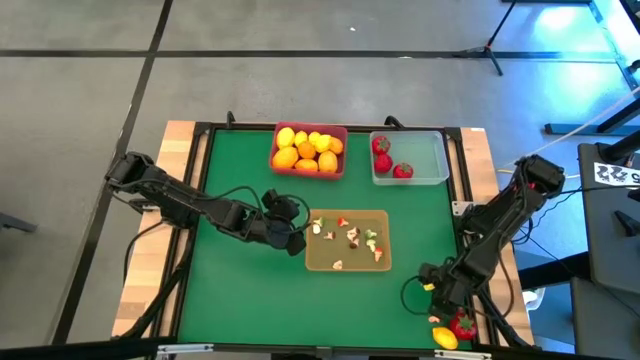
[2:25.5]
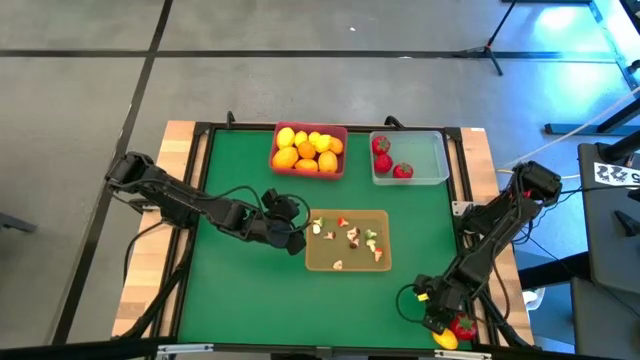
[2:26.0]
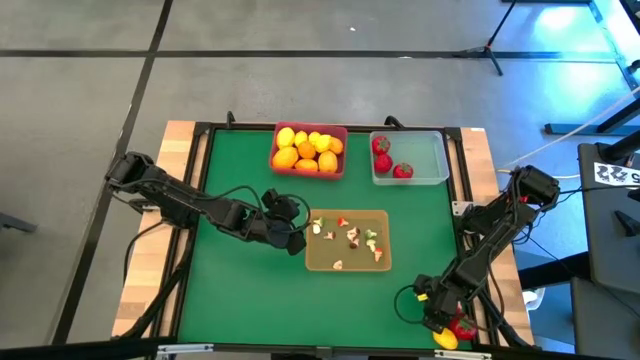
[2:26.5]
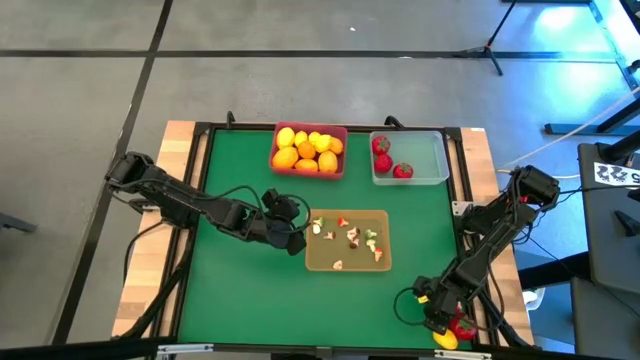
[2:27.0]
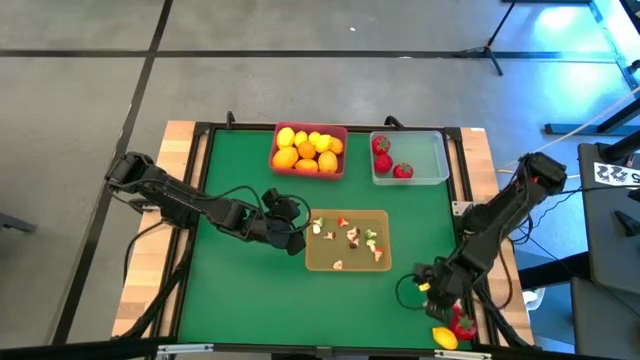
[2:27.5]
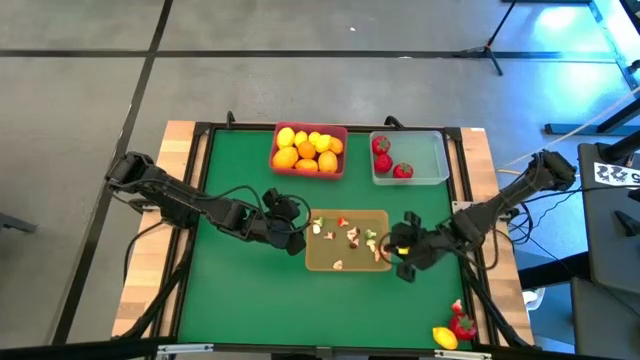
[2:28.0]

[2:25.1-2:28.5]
Task: Sort produce into baskets
Put the red mushroom into the orange bin

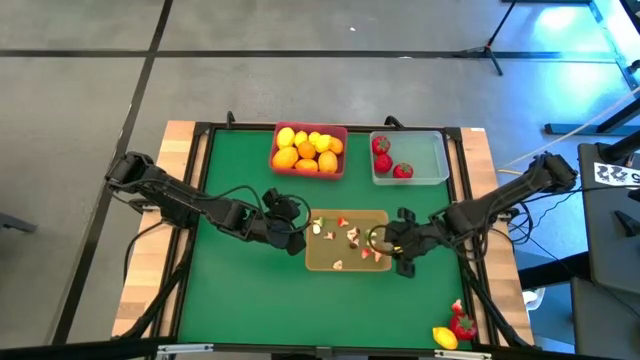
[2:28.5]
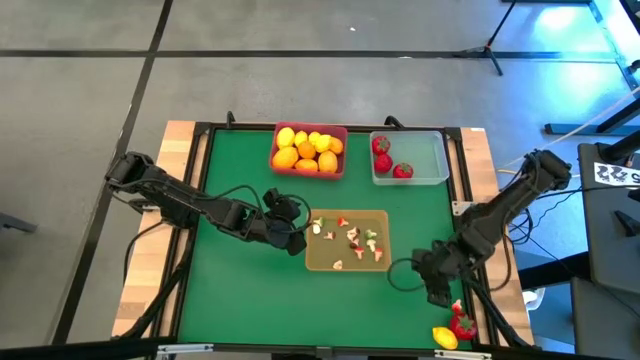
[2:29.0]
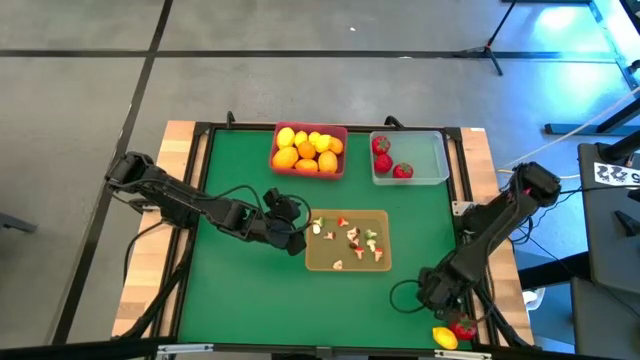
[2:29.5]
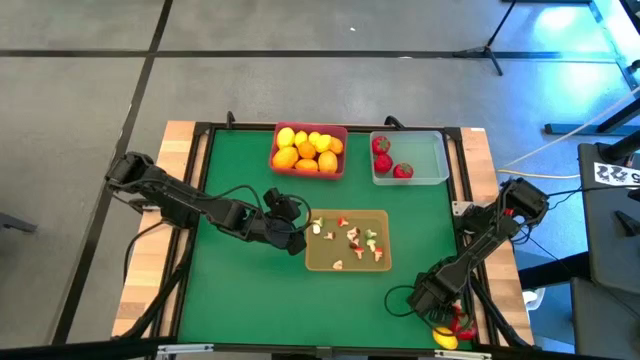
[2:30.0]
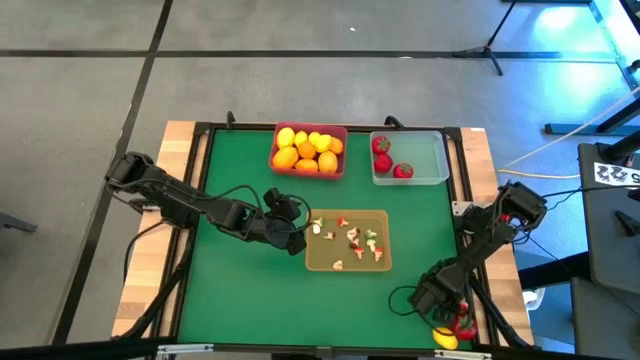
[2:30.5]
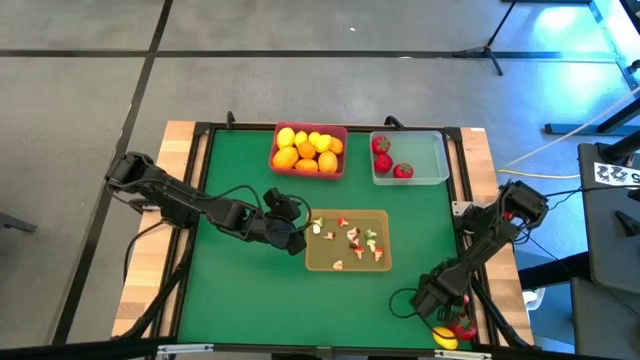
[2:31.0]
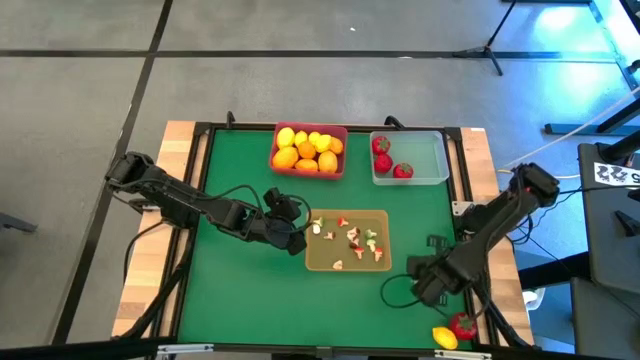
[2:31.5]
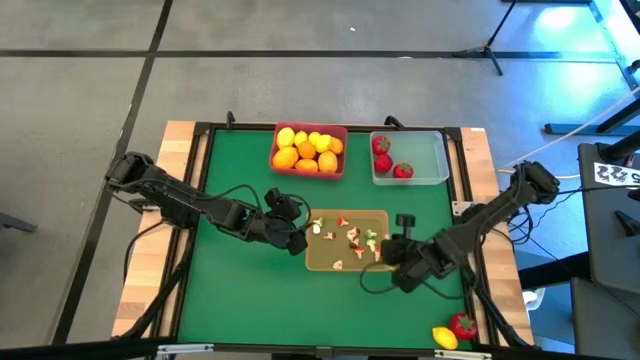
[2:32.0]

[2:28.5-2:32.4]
Put the red mushroom into the orange bin

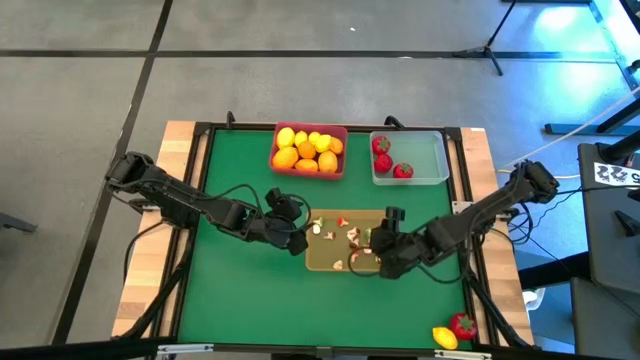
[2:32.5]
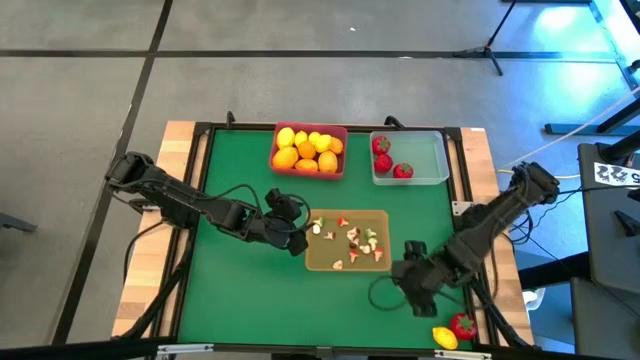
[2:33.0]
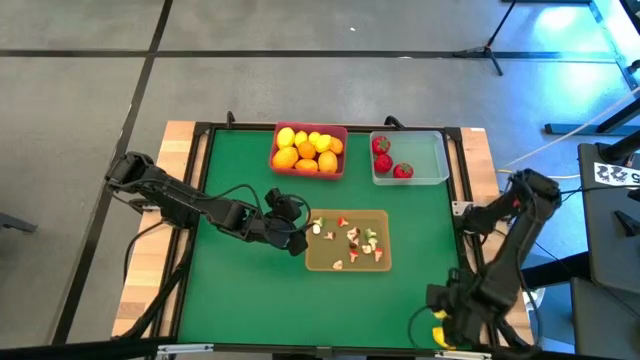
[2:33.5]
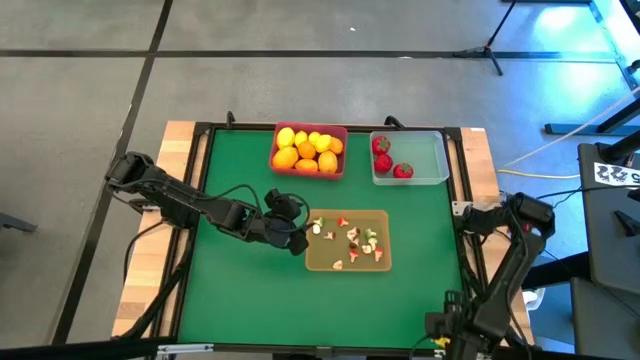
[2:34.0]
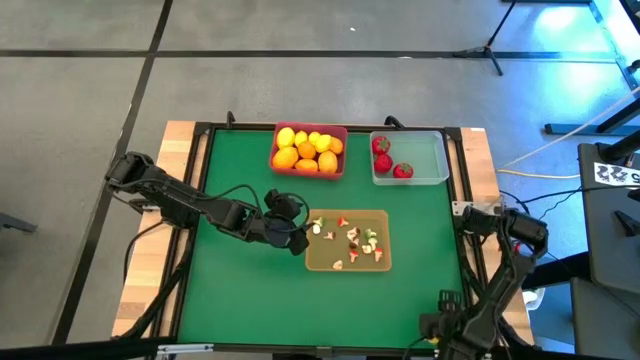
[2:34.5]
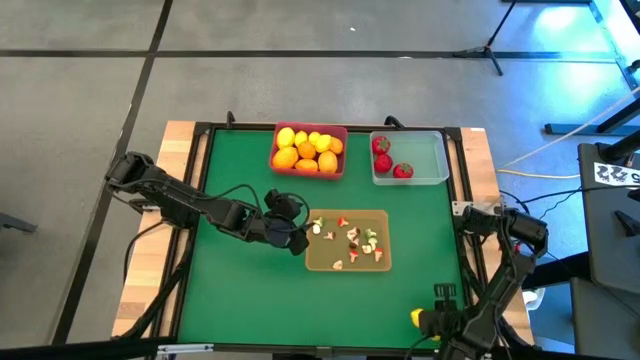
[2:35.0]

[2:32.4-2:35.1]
Put the yellow lemon into the red bin

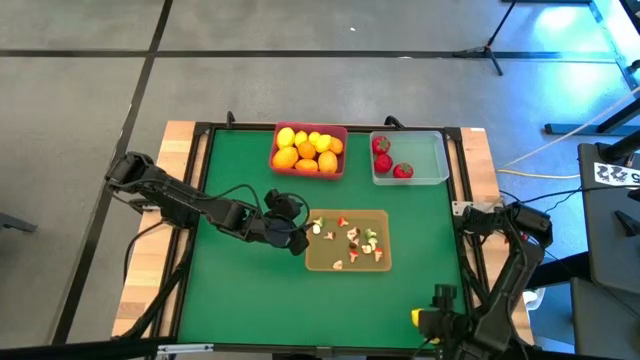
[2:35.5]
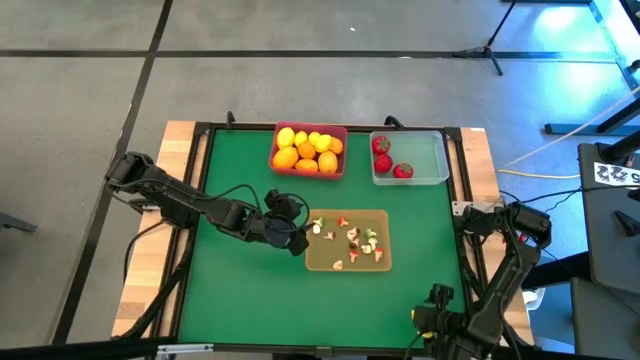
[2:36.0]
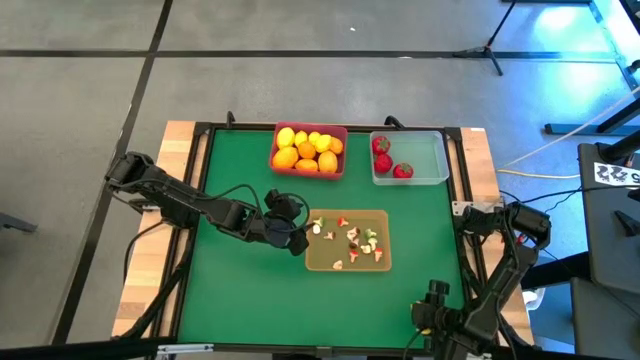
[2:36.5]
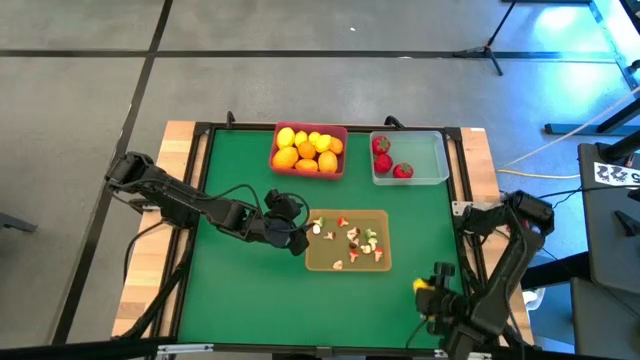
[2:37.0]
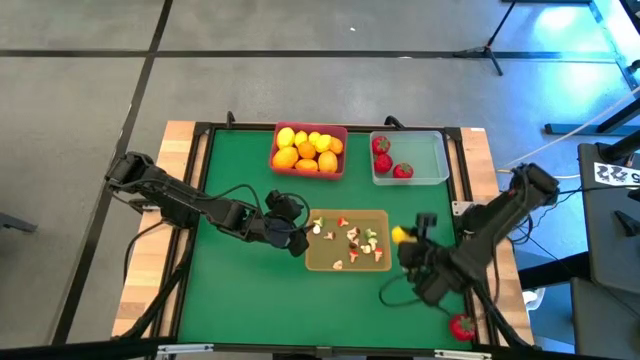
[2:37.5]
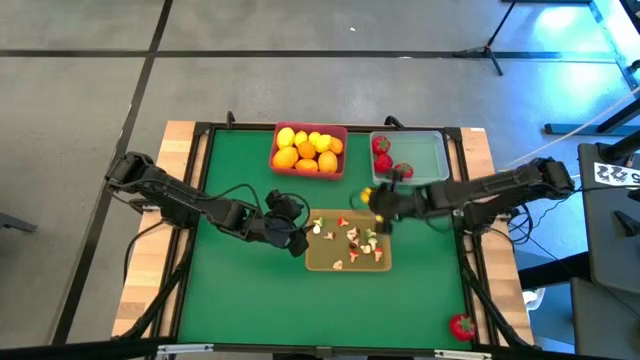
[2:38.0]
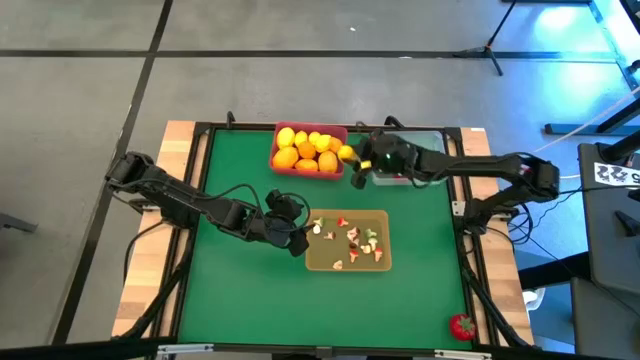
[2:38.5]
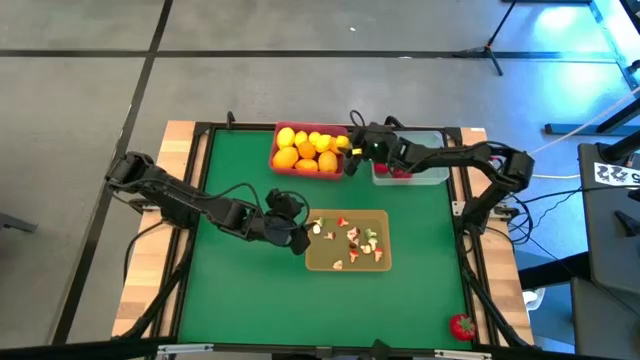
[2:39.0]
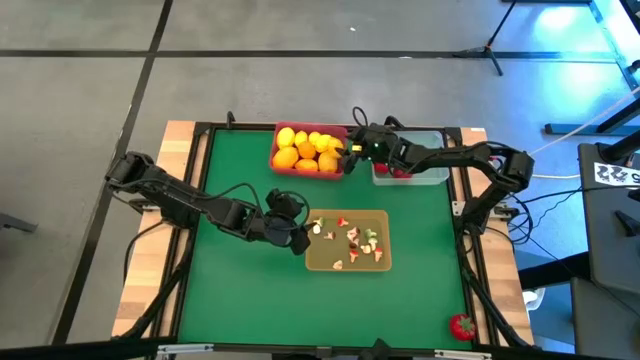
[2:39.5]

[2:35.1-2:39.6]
Put the yellow lemon into the red bin

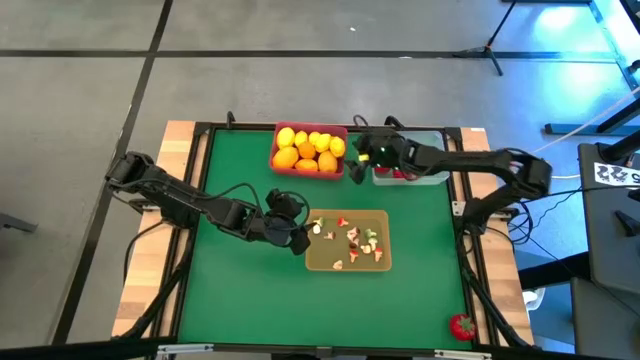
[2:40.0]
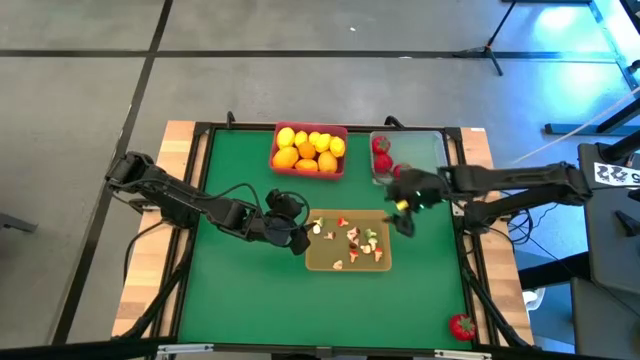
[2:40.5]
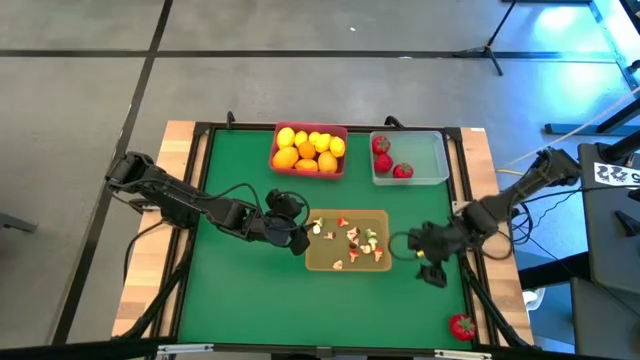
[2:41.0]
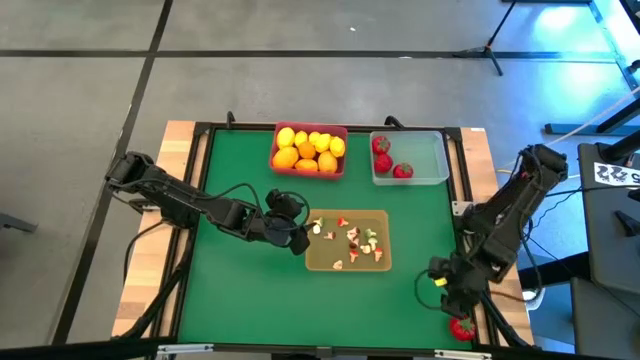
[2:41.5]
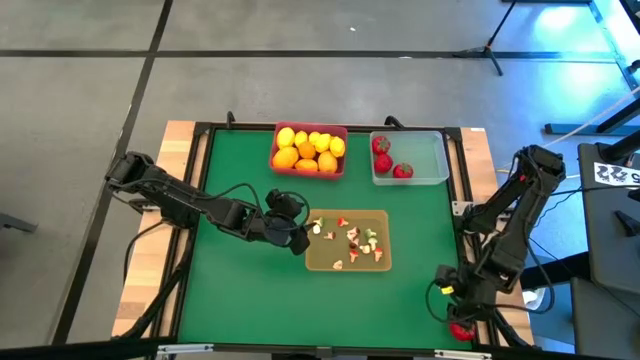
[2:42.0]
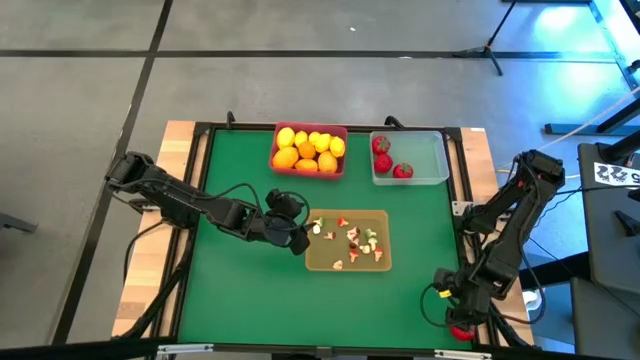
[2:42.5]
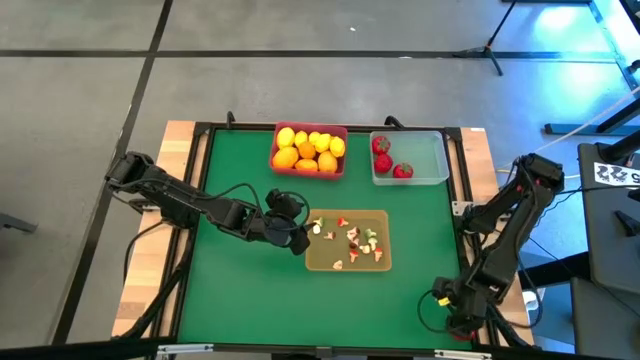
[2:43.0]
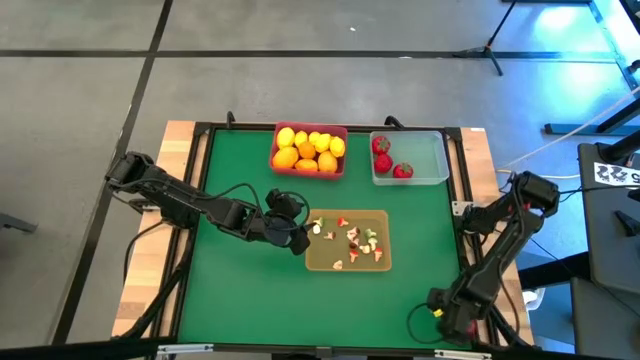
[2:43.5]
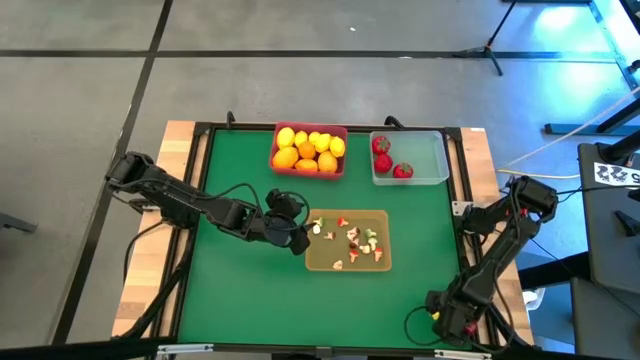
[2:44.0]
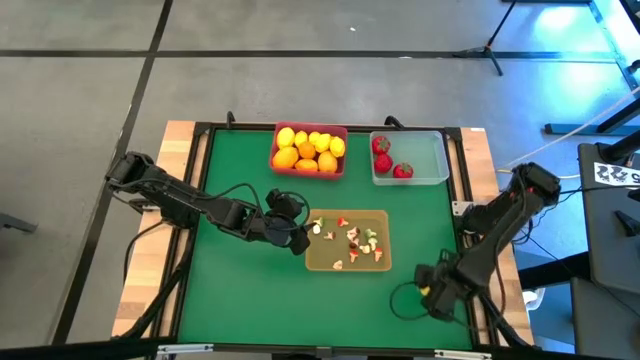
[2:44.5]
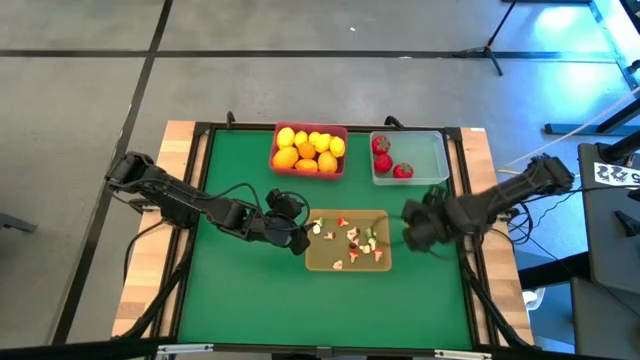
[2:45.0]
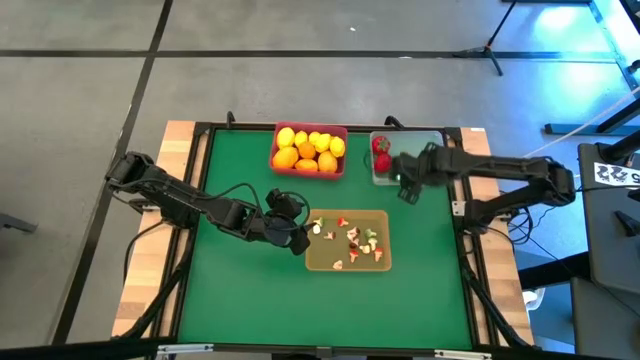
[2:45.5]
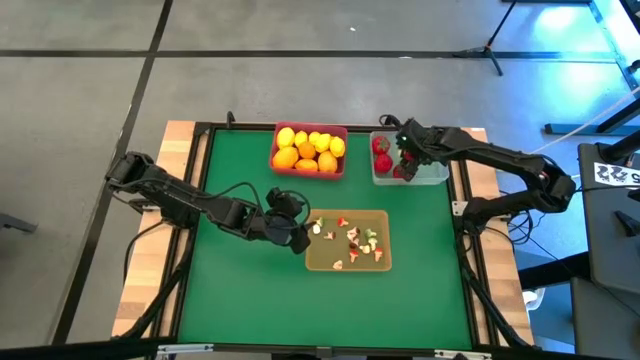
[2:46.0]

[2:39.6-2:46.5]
Put the red tomato into the white bin
